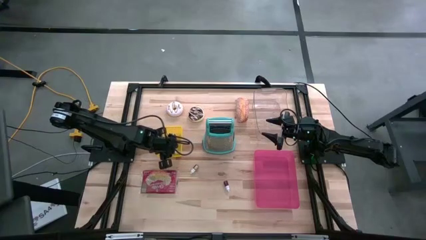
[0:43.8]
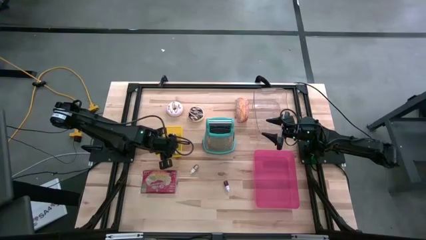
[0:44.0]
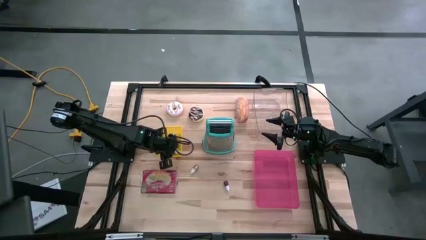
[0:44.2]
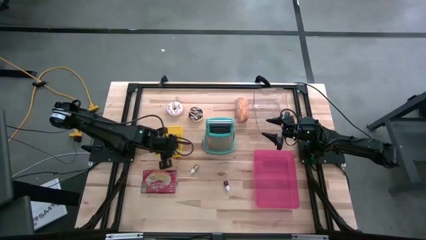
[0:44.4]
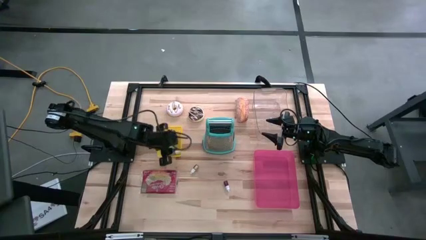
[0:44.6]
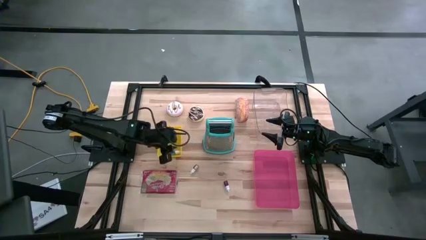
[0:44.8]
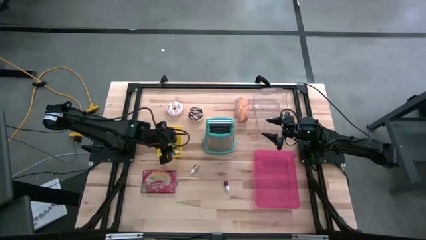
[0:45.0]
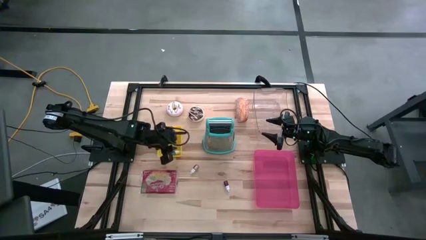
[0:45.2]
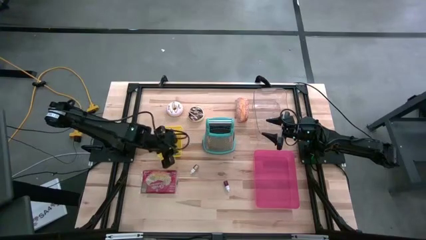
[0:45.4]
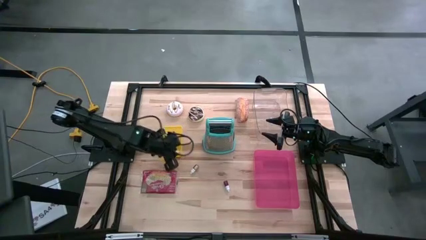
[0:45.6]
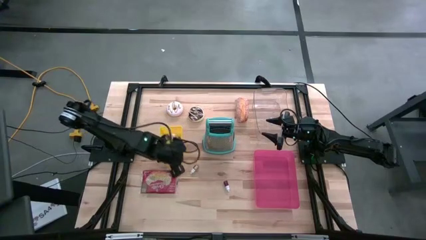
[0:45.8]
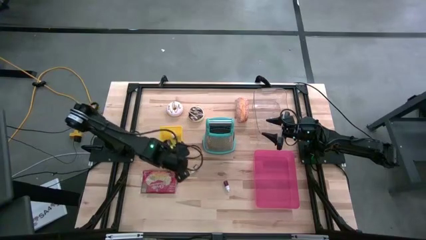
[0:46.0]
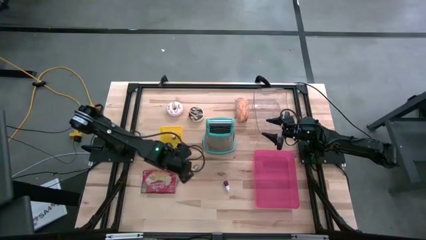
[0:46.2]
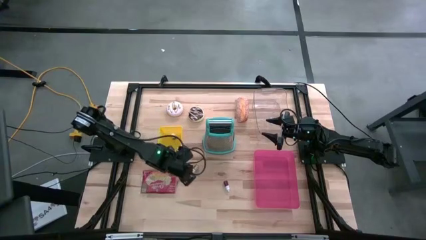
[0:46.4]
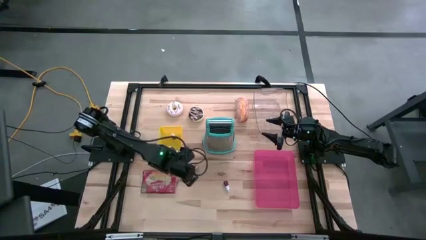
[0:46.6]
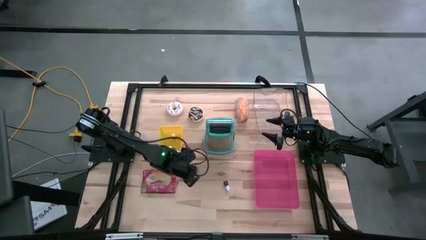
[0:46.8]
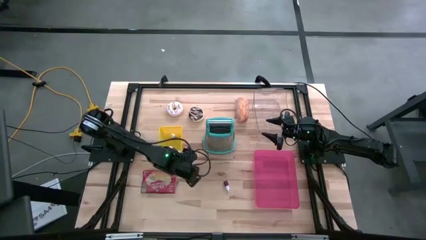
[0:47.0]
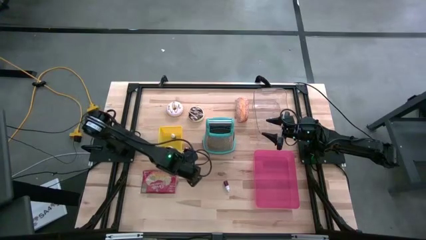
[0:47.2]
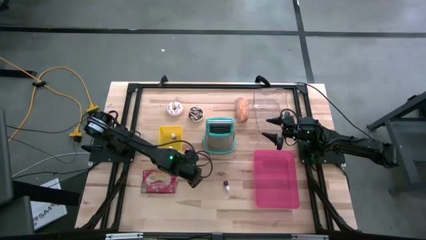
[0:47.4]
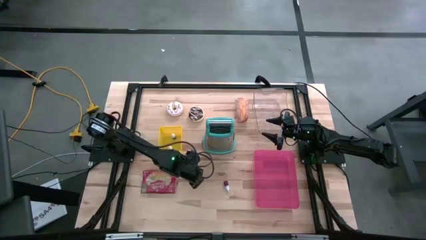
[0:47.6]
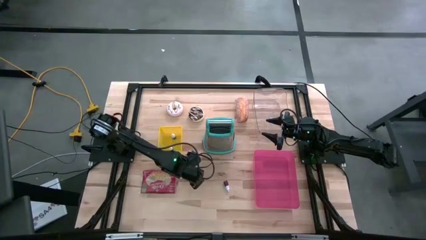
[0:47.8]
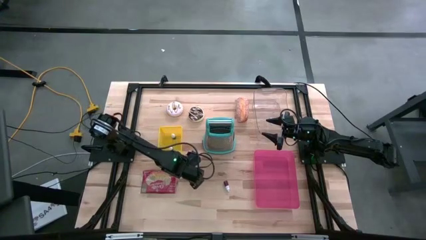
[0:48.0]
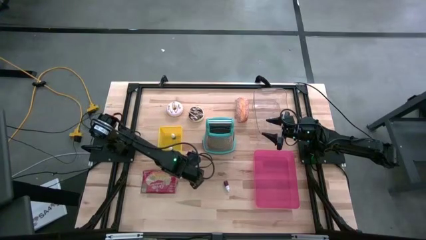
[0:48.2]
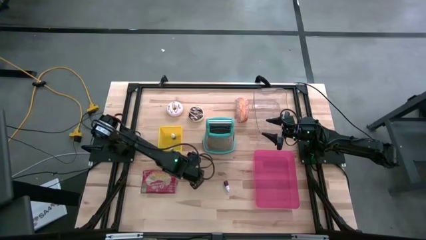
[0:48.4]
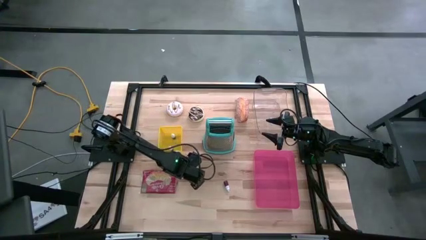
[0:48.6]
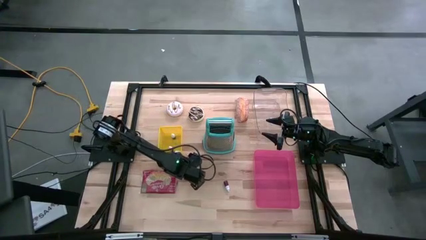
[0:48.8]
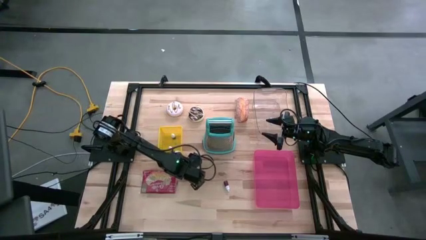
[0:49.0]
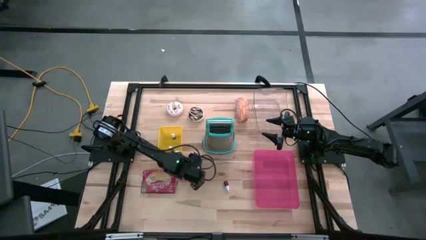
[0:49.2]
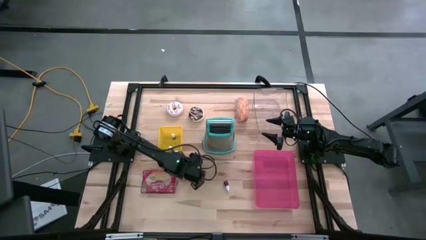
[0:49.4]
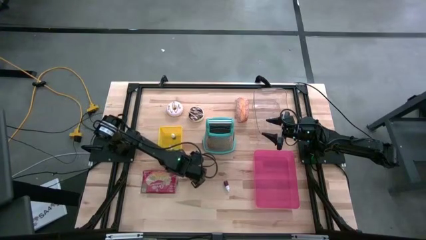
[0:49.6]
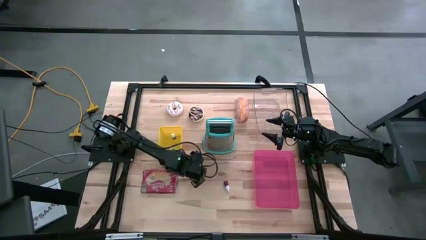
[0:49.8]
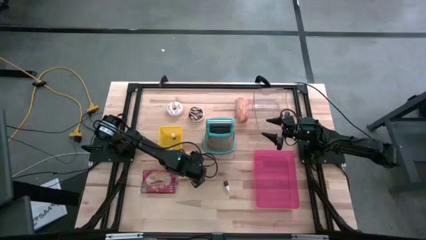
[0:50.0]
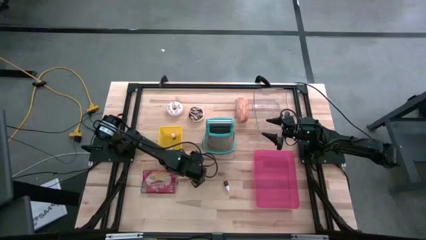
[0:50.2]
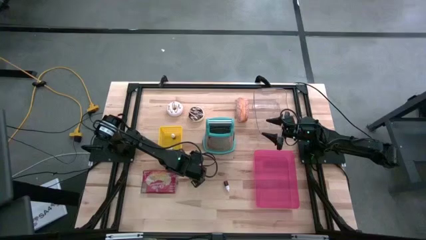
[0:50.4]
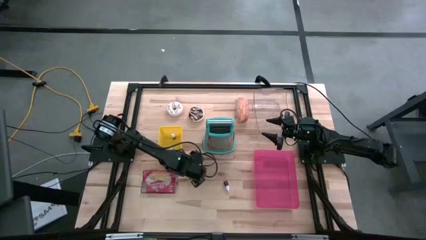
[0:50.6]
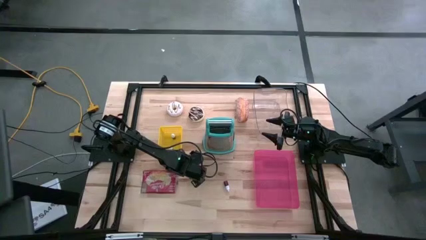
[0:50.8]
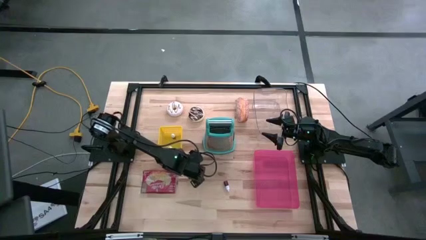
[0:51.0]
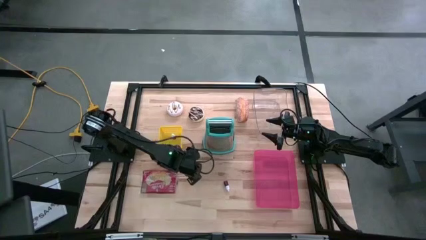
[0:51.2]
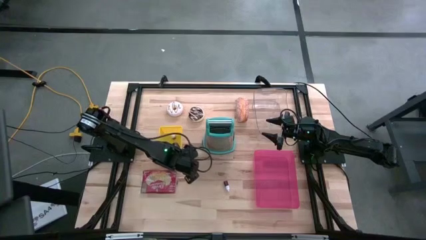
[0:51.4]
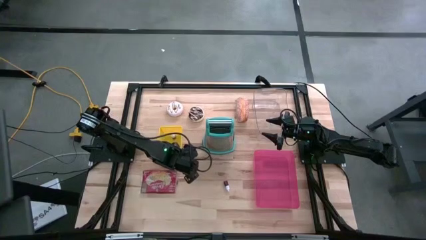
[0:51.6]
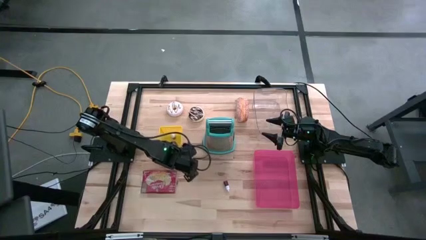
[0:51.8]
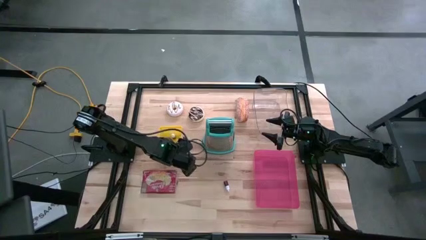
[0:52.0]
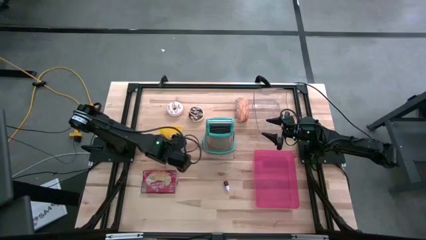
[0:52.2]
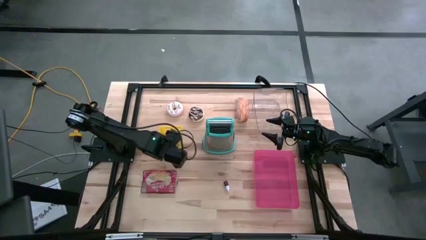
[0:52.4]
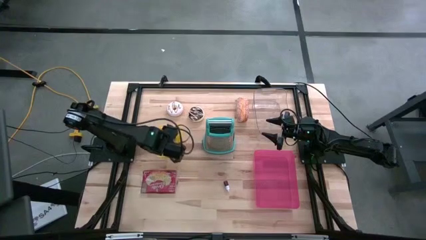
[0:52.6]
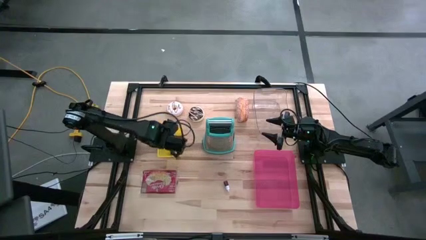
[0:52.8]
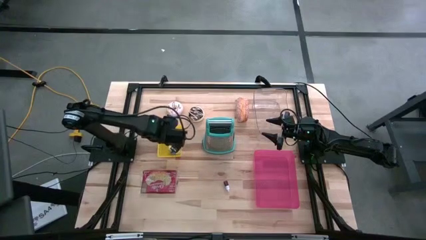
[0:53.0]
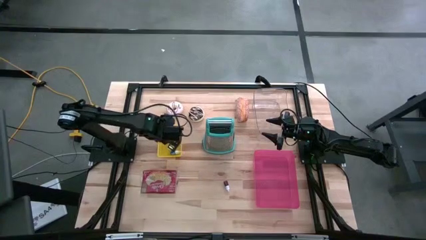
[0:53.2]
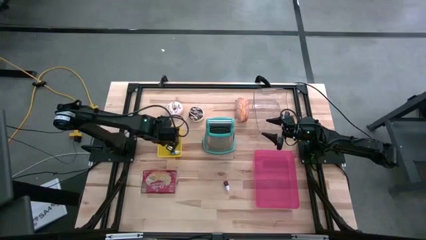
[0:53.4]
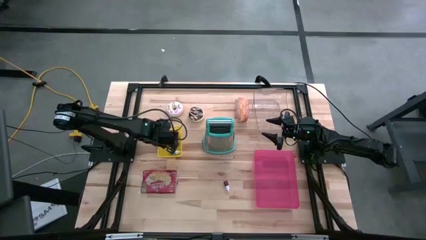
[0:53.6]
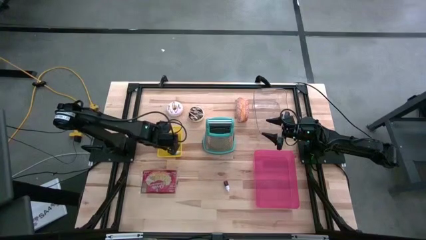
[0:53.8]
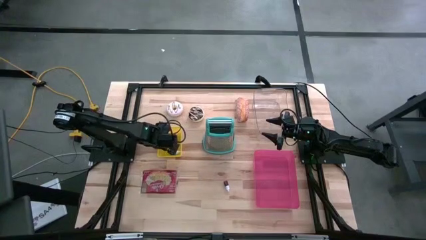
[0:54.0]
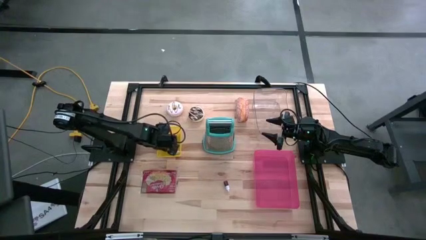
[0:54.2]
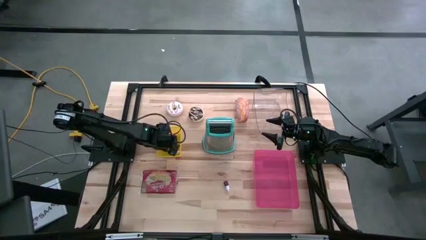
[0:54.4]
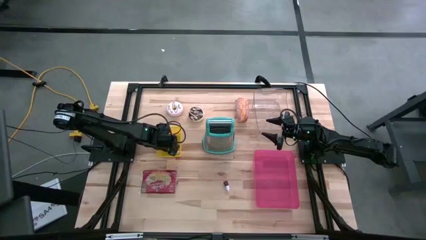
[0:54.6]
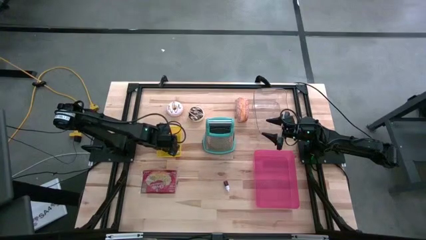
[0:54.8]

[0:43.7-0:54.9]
Put the yellow food coloring bottle into the yellow bin
